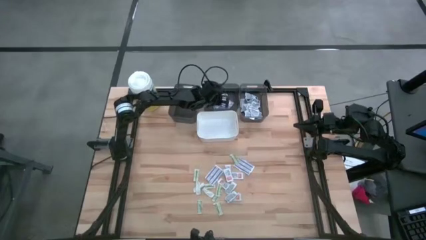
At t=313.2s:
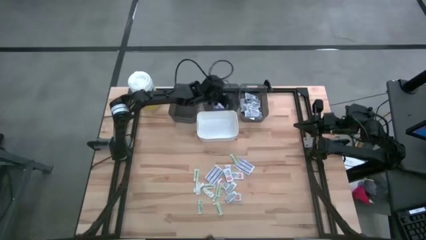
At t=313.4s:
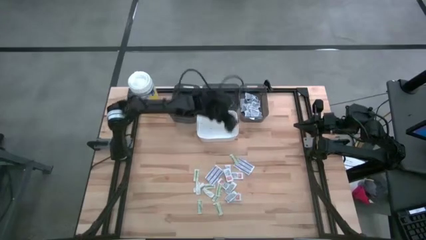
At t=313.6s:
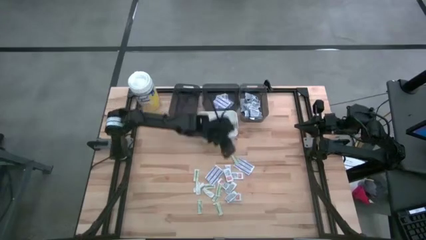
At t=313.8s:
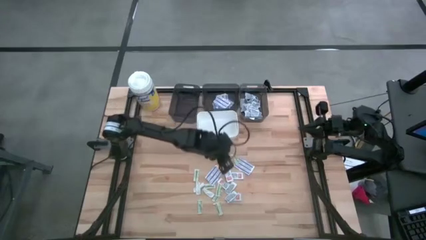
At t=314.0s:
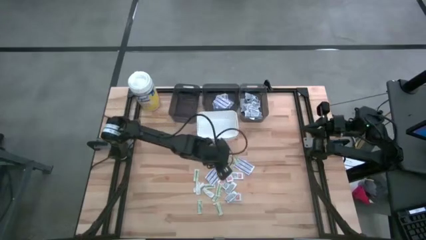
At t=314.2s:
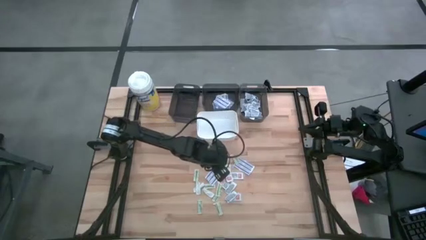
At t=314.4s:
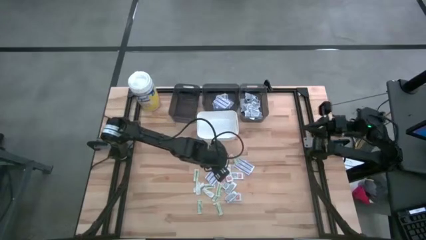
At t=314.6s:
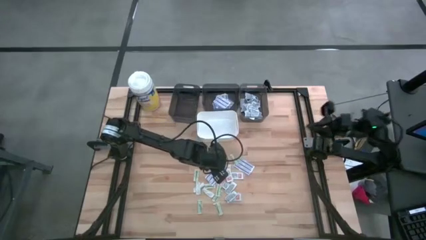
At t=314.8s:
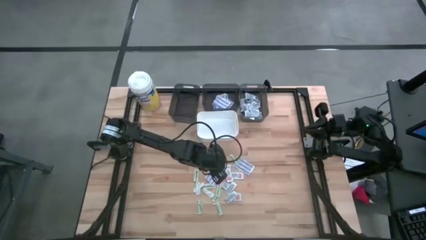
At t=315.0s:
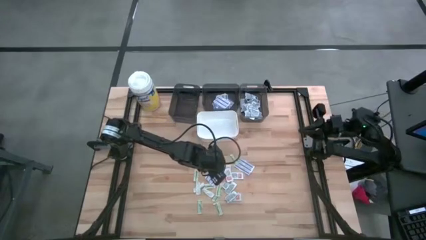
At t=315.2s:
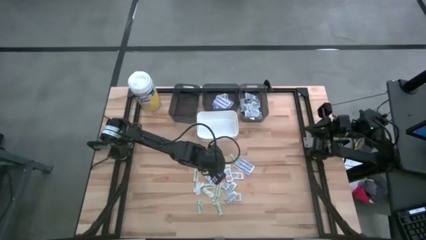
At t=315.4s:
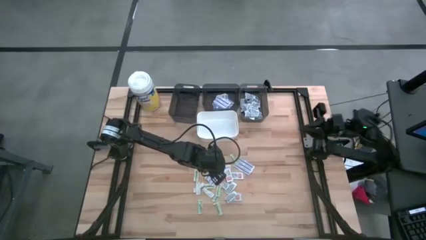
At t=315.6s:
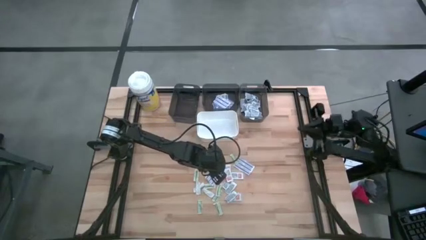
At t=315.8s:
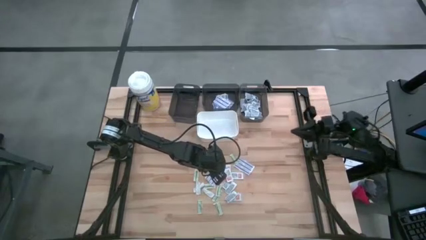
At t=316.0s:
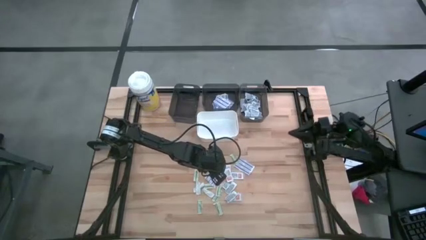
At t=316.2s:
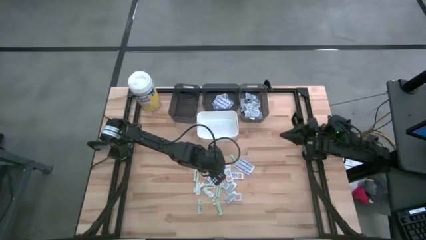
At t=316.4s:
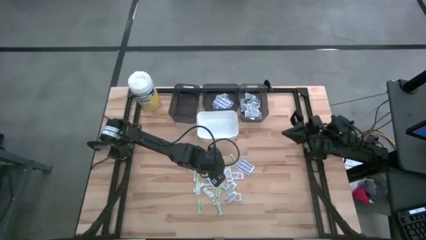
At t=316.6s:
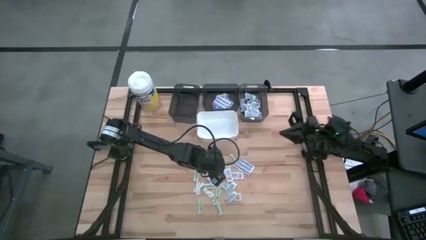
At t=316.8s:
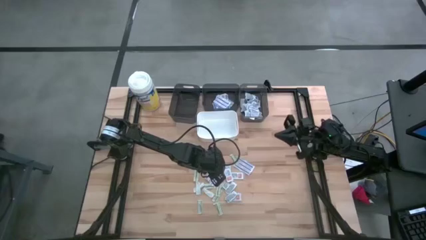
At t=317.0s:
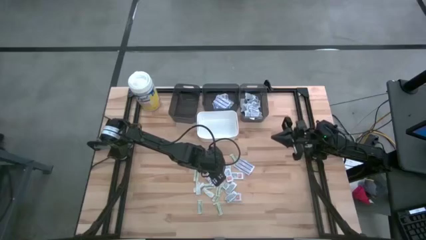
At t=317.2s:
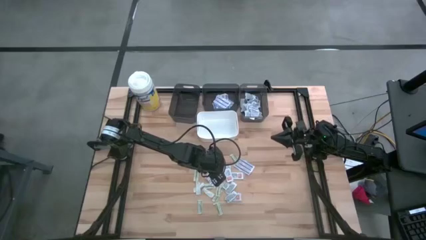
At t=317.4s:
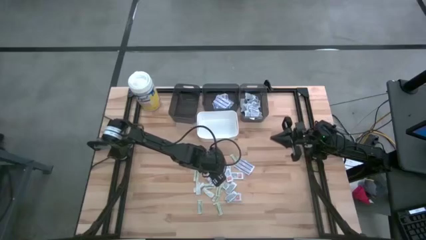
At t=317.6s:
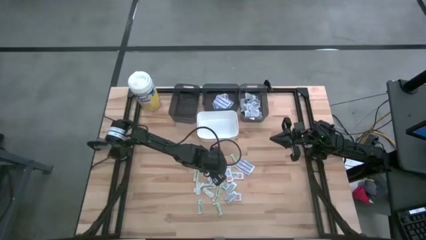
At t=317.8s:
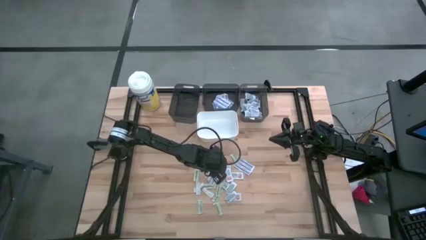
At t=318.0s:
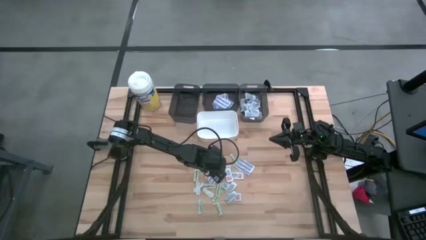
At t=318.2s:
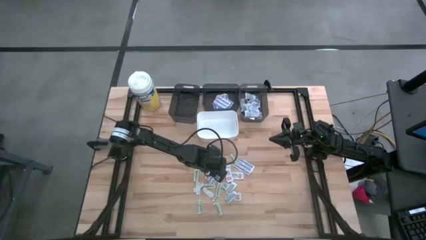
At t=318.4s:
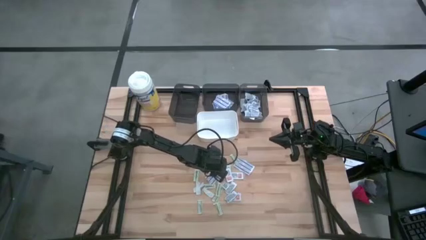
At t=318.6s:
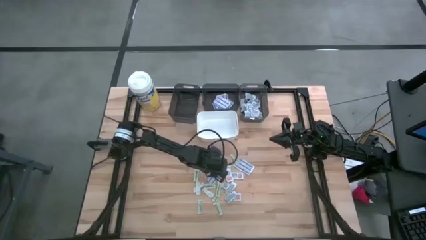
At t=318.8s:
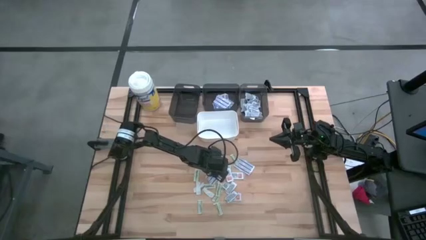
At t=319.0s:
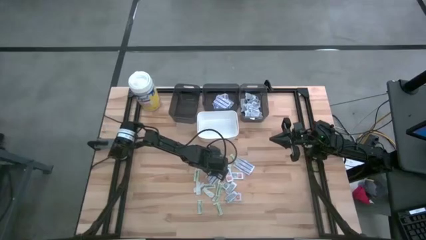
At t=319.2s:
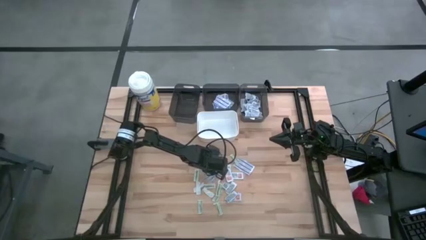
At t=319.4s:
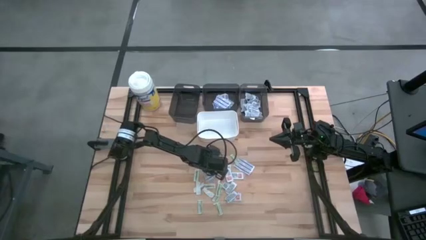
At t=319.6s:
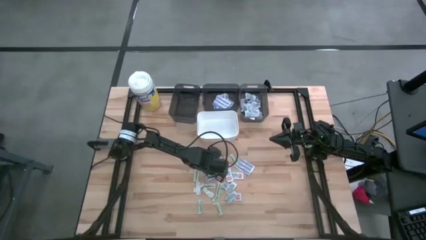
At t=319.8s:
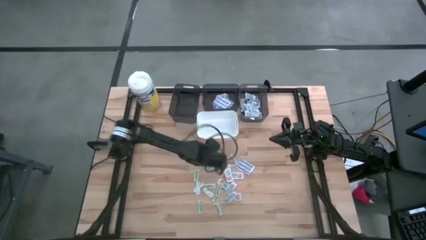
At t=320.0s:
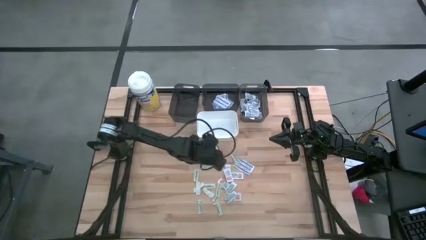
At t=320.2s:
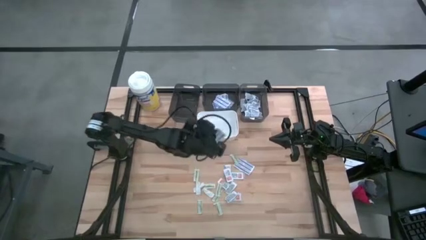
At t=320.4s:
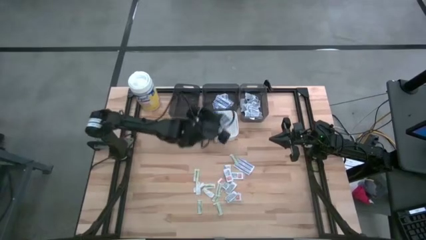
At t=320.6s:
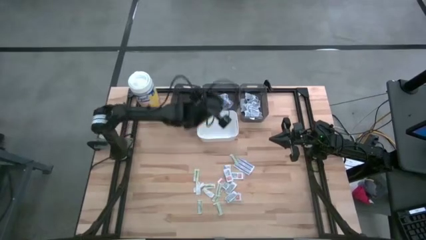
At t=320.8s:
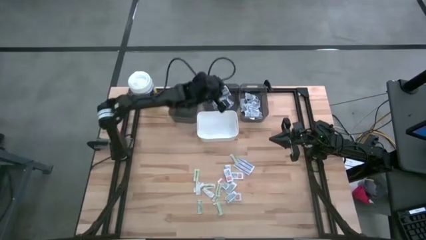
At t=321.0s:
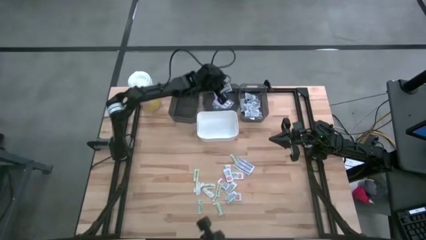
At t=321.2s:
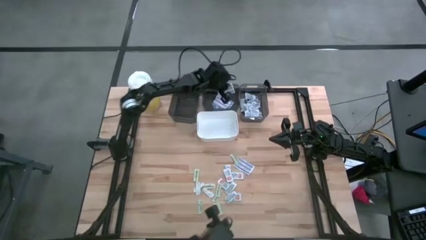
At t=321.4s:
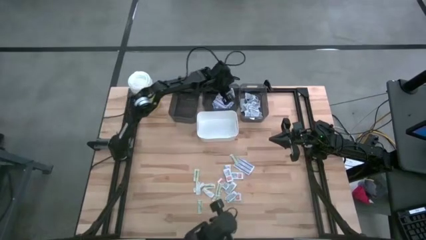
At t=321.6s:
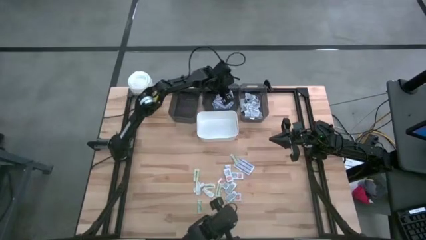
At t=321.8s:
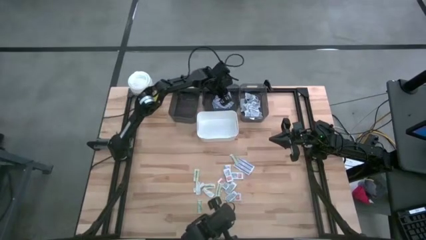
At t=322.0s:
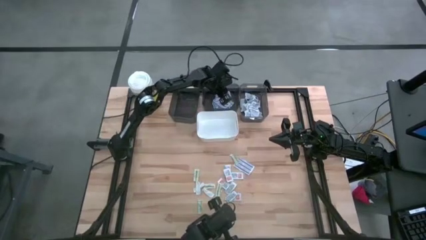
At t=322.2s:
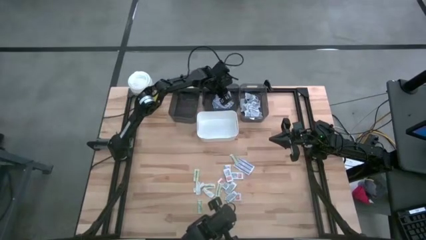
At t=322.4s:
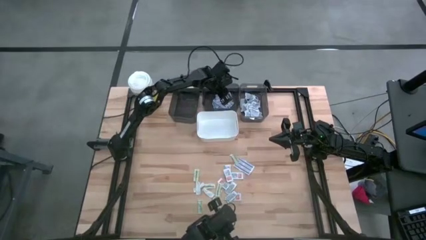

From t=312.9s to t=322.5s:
Task: Pick & Place First Aid Supplies
Put the blue bandage pack into the middle black bin

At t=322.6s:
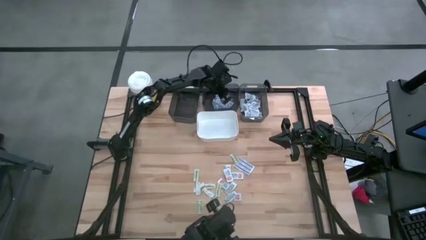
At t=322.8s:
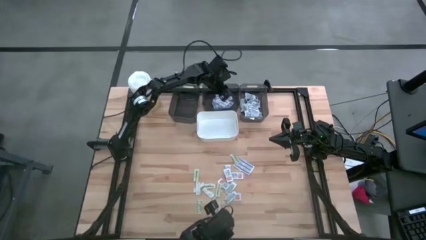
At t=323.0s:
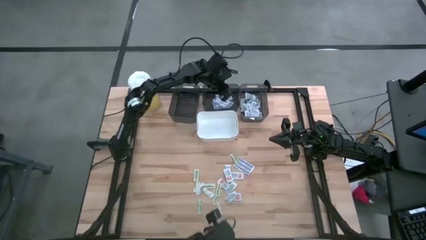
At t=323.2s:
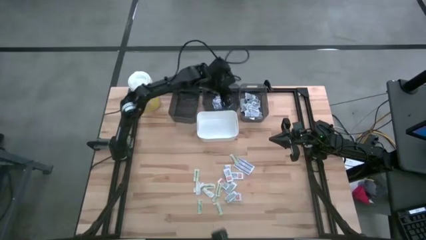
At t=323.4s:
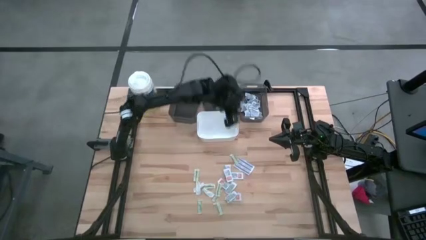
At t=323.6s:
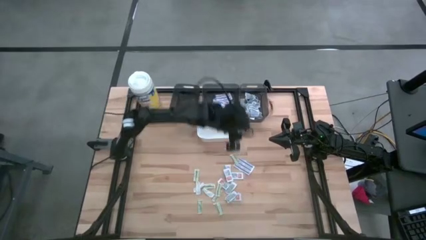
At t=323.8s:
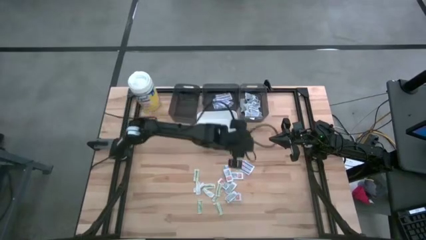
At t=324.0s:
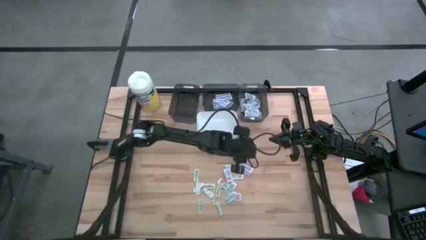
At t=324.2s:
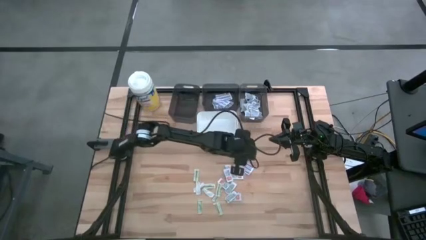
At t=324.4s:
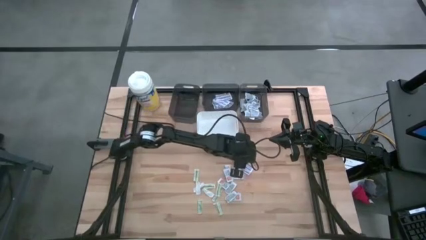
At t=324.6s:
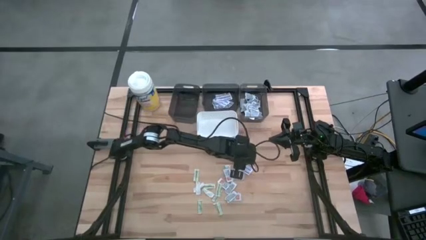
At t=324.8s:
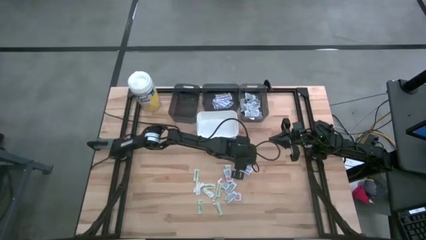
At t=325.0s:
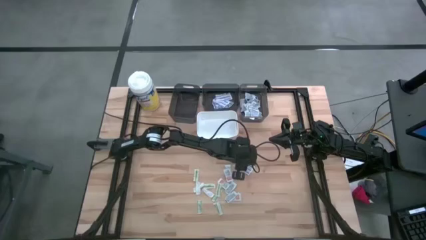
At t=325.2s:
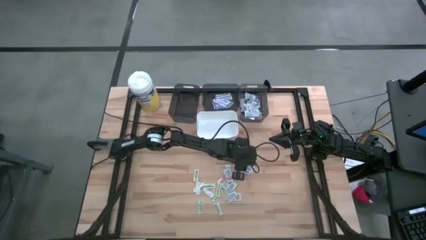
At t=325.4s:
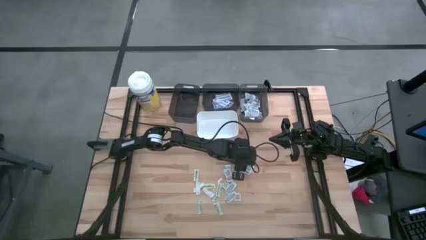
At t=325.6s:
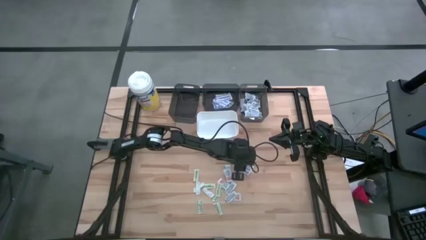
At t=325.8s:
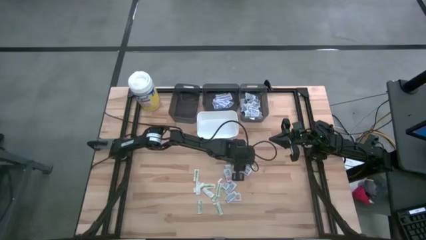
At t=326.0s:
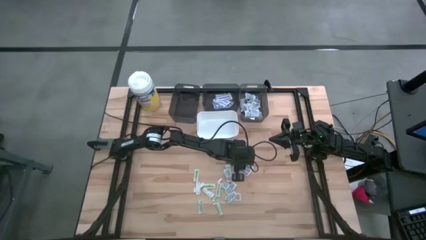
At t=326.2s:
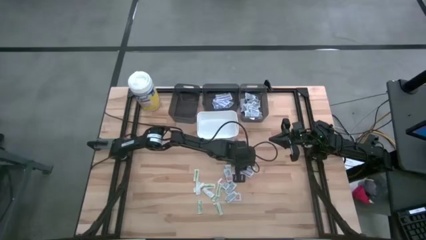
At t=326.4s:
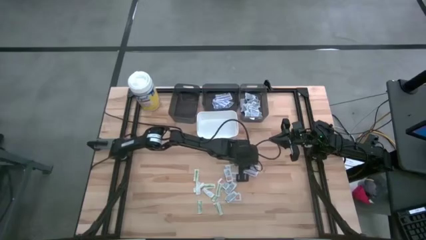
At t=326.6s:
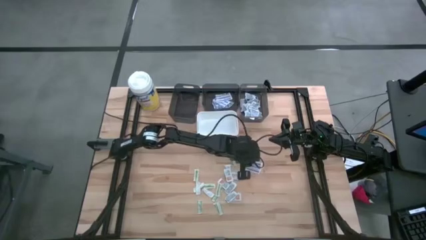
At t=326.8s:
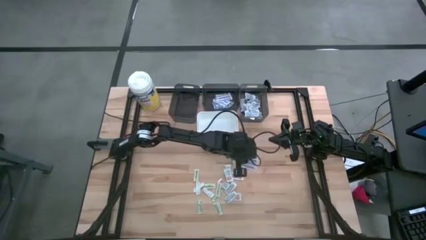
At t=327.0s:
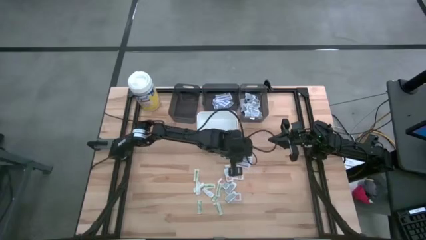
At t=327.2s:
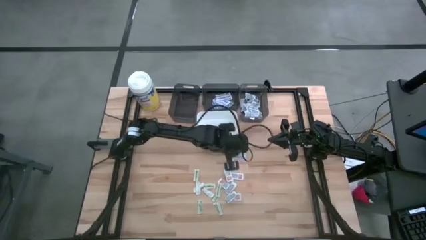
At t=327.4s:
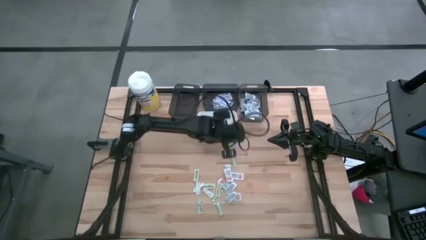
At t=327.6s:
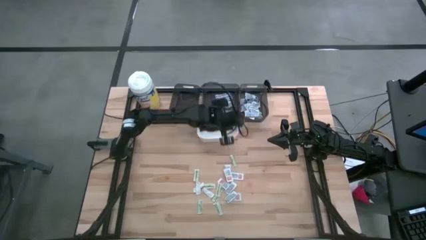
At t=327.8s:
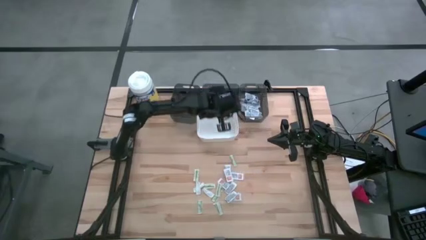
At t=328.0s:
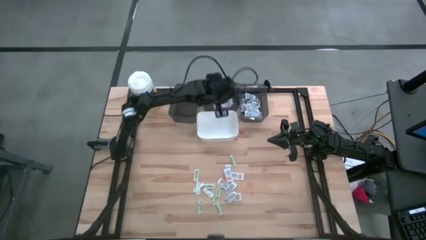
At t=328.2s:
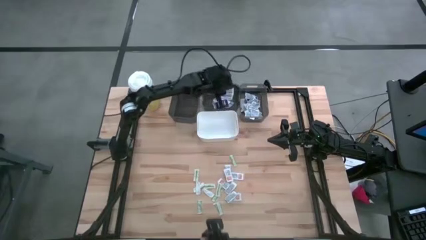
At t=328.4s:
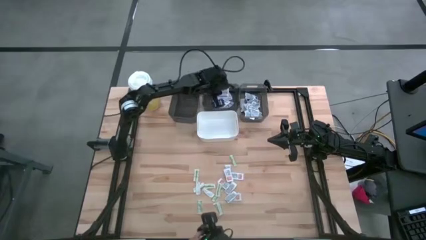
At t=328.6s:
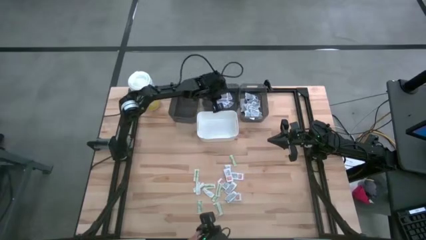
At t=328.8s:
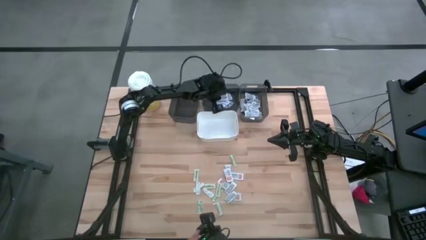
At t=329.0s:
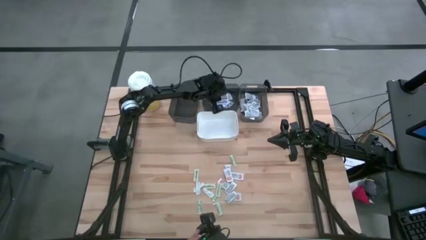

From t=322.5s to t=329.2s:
Put the blue bandage pack into the middle black bin
